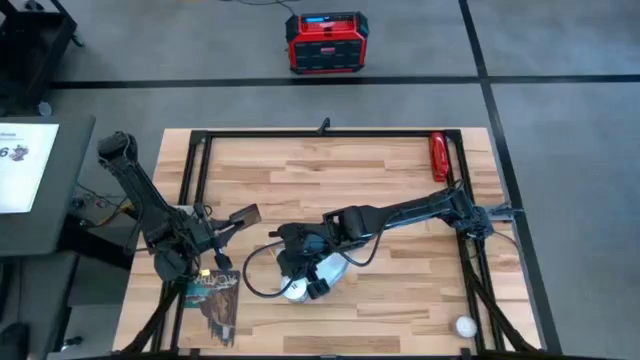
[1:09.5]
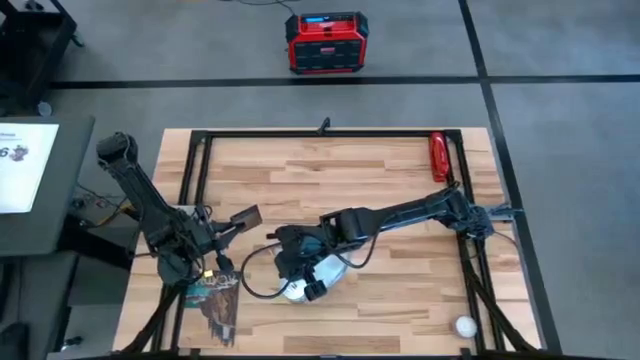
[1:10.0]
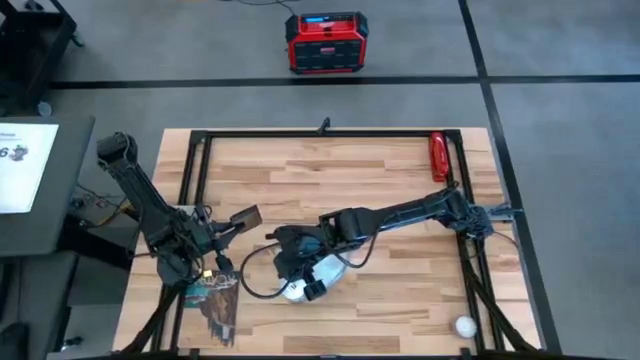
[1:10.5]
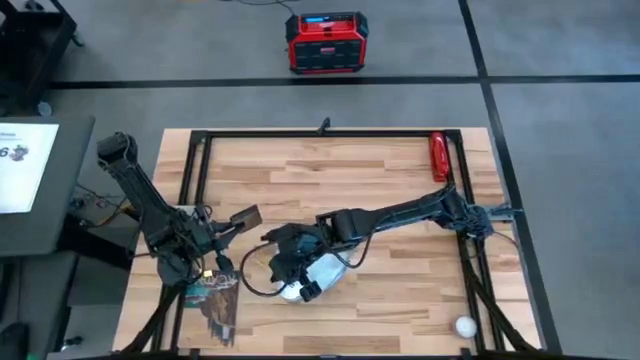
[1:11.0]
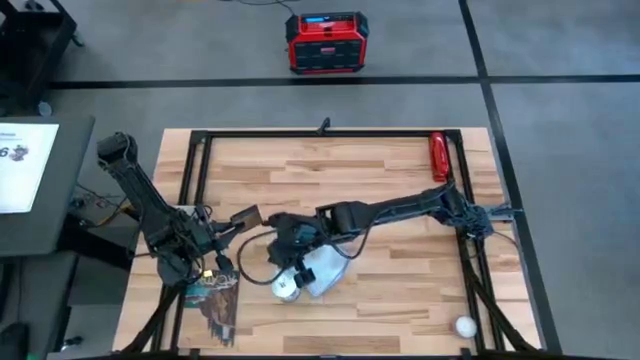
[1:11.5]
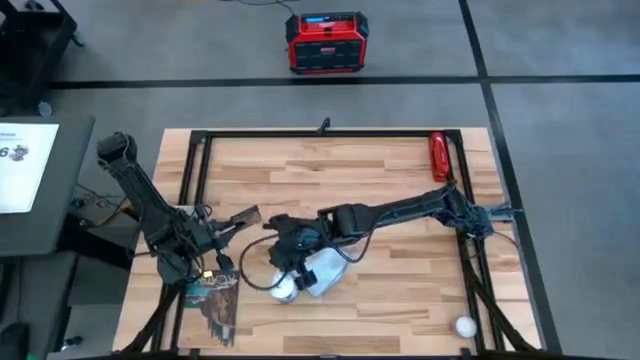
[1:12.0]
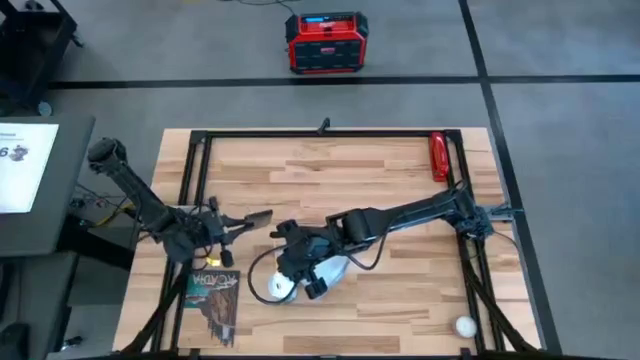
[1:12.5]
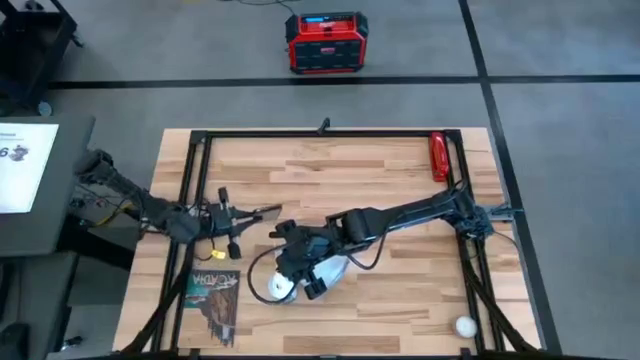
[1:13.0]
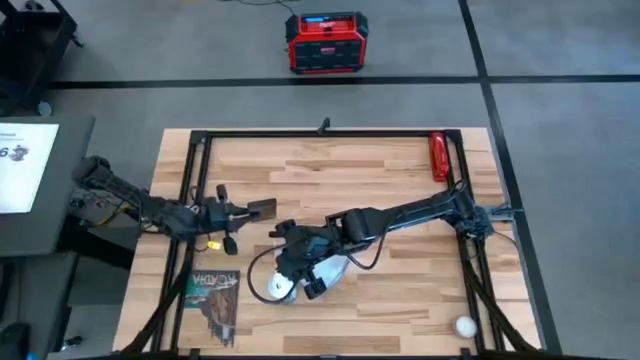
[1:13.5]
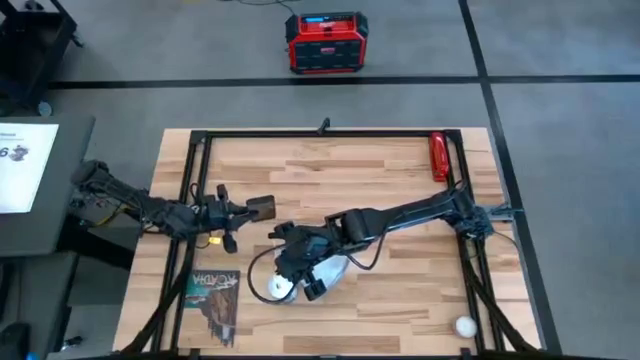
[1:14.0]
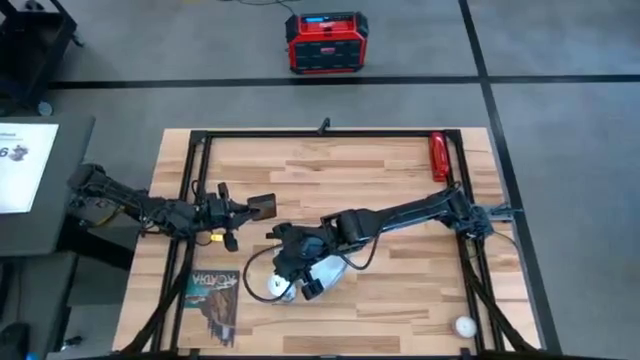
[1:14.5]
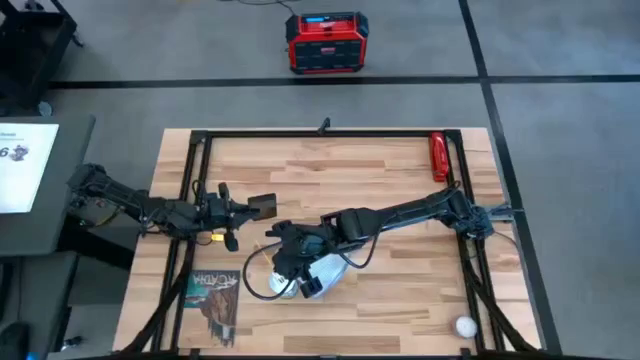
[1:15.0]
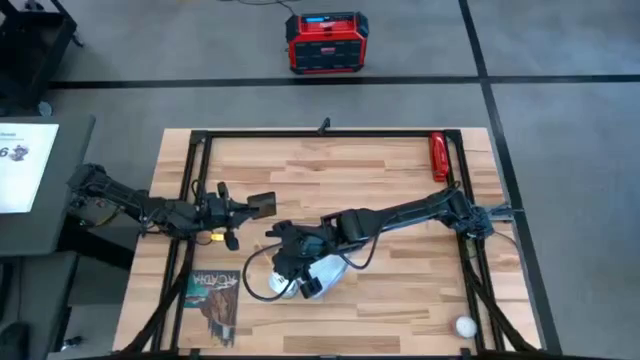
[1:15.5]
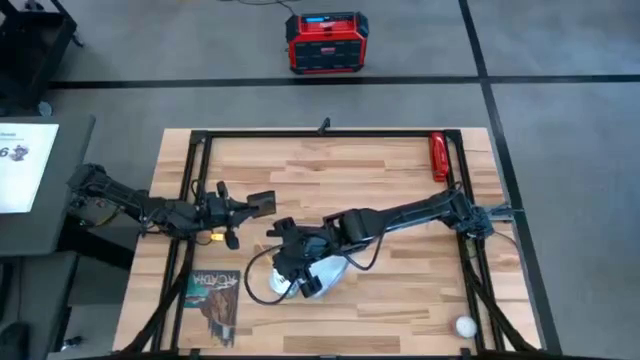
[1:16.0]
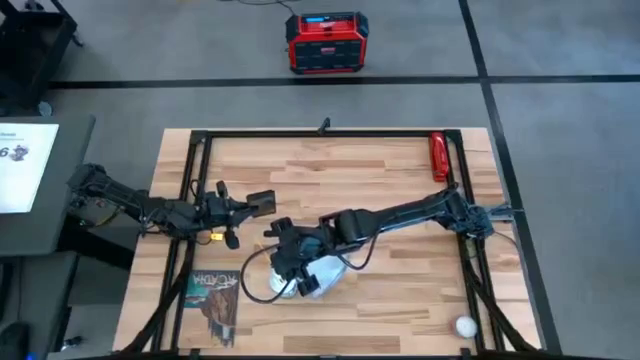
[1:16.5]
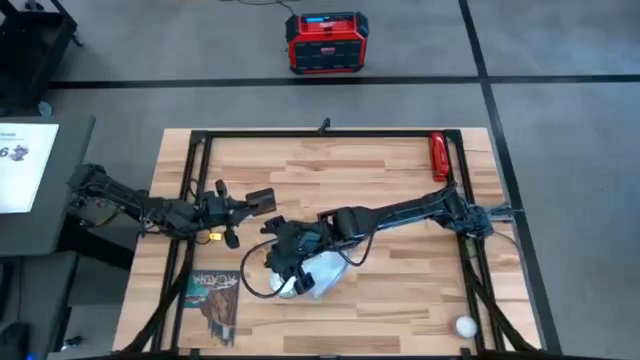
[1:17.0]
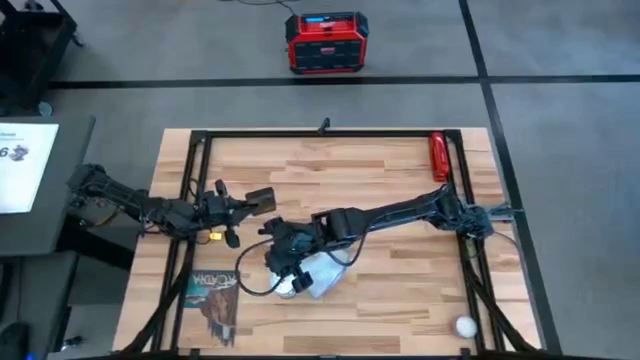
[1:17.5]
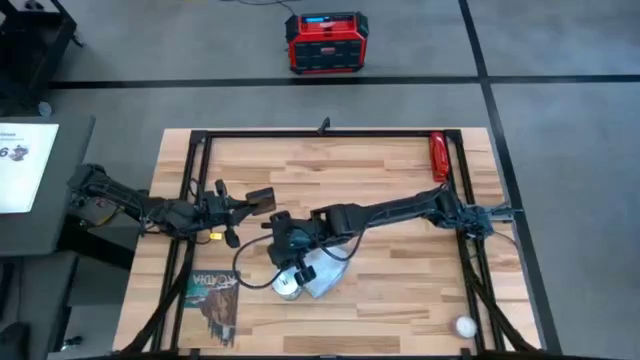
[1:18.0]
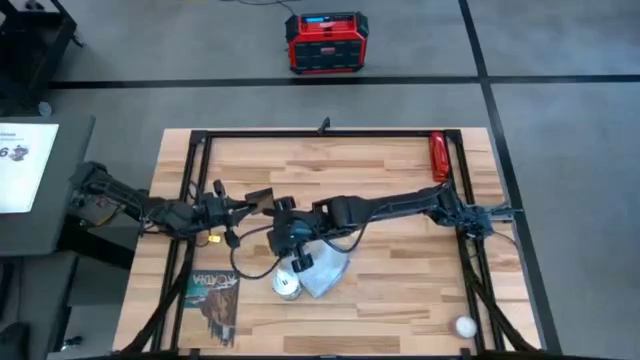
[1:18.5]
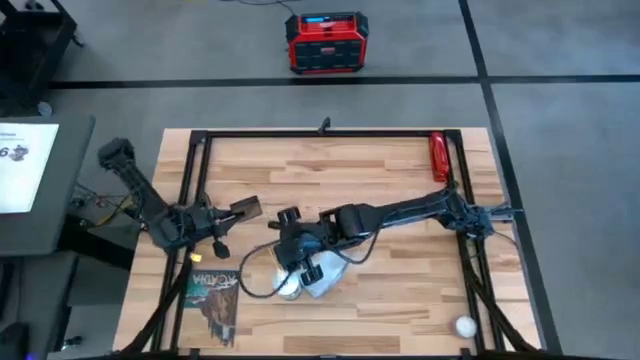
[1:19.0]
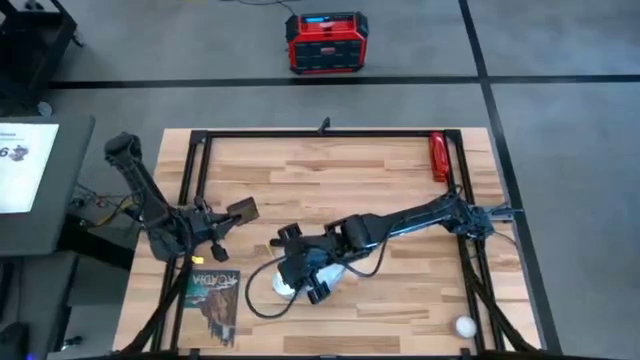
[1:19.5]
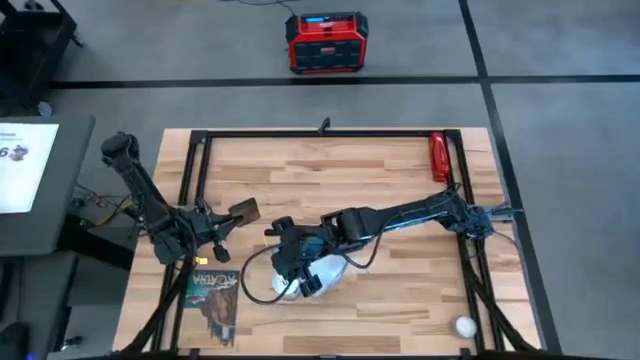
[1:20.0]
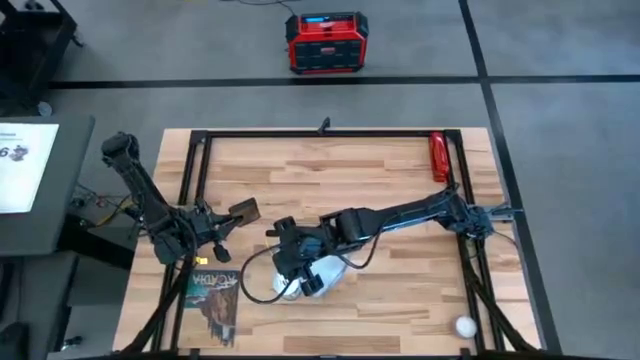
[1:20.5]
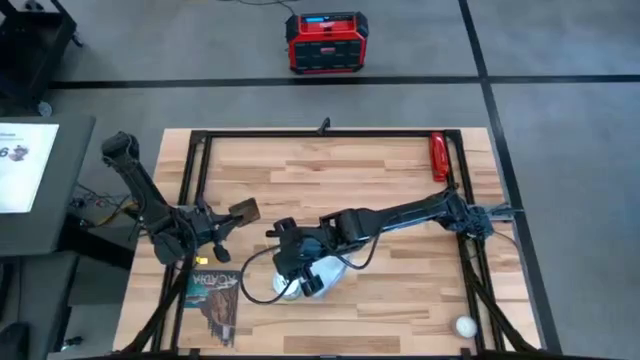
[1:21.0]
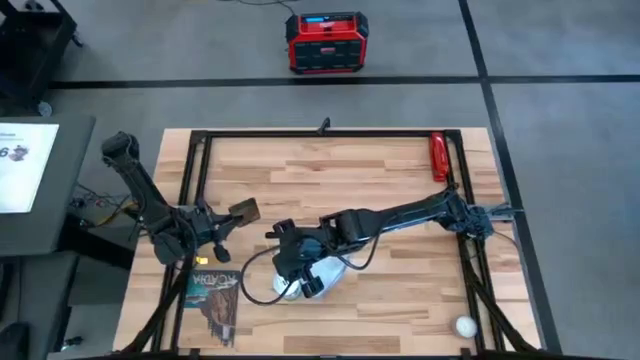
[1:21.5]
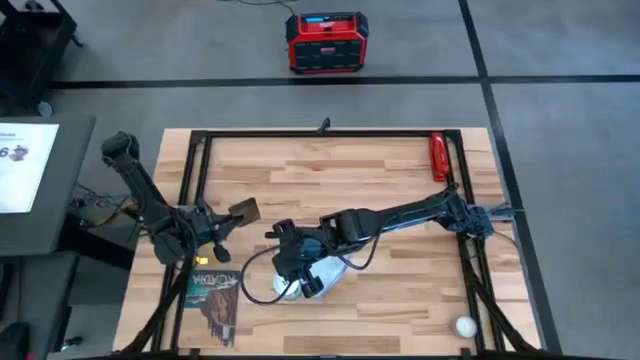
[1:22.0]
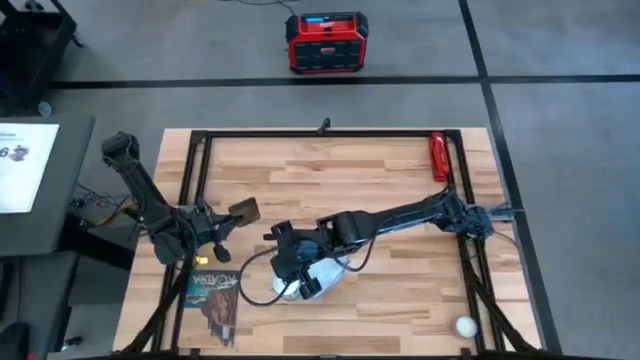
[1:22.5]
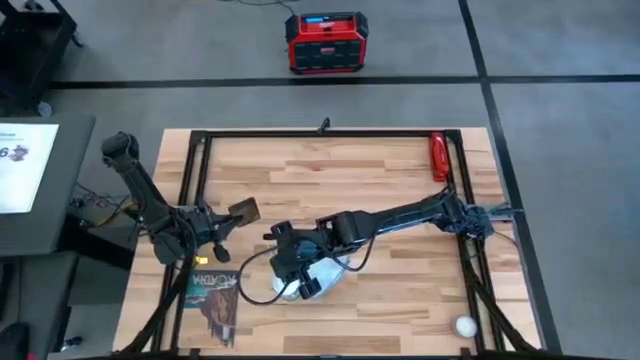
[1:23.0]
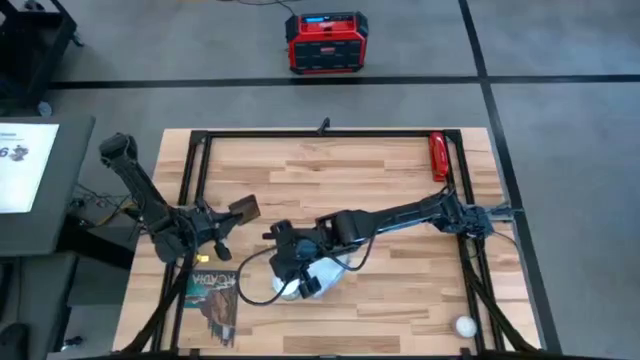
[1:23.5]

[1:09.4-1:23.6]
Task: Apply microfiber cloth
Spray the front of the cellphone using the spray bottle

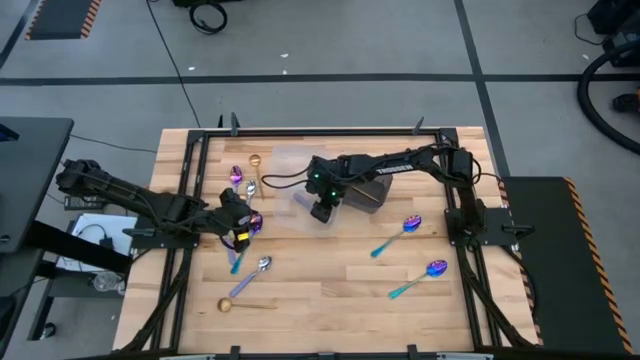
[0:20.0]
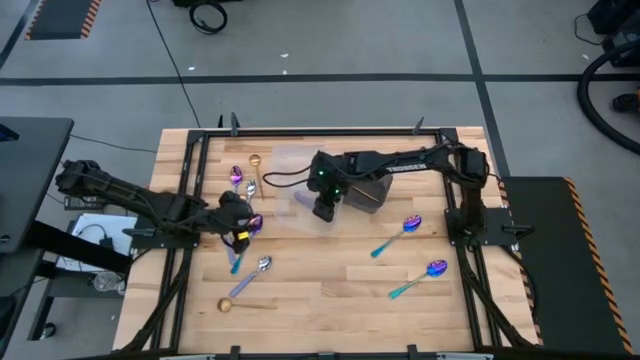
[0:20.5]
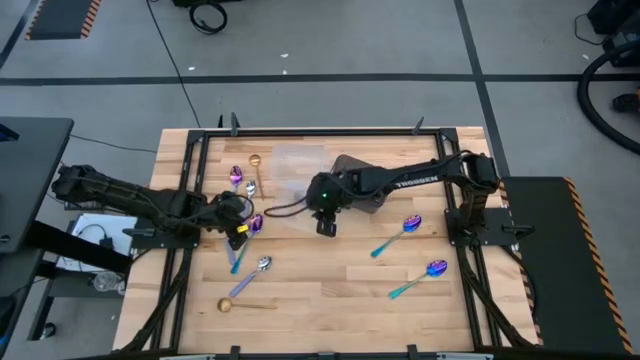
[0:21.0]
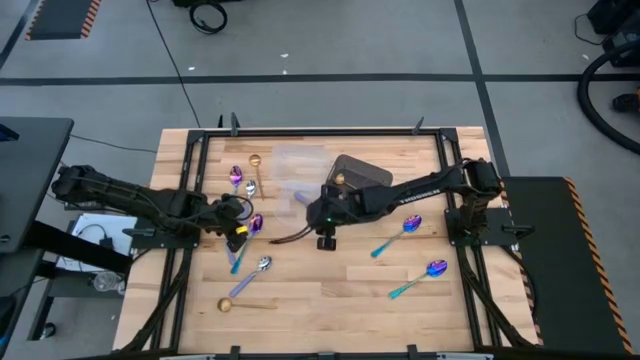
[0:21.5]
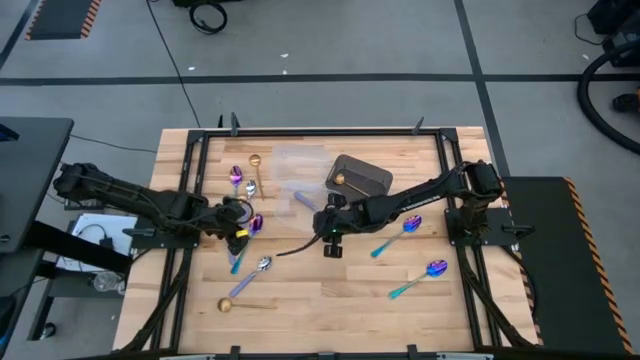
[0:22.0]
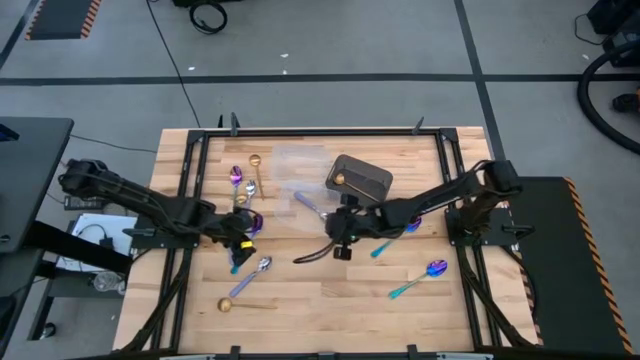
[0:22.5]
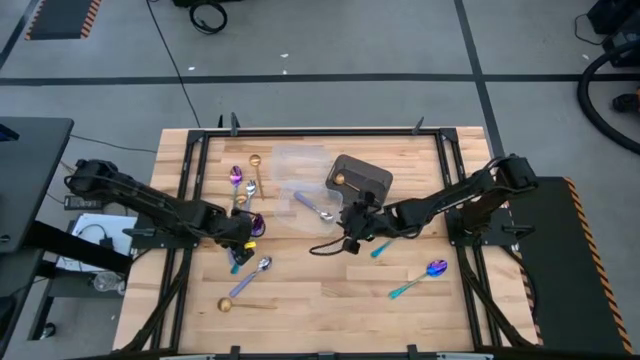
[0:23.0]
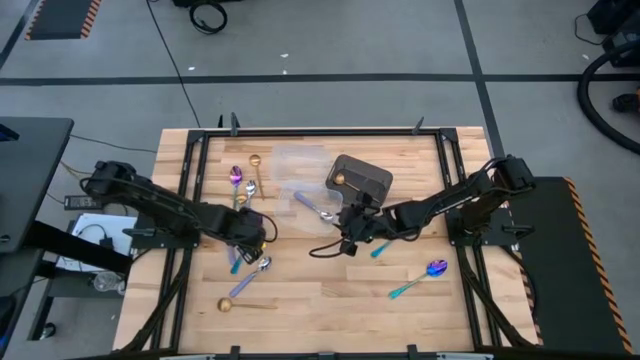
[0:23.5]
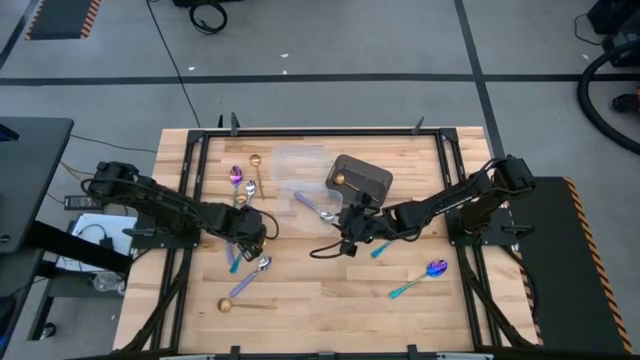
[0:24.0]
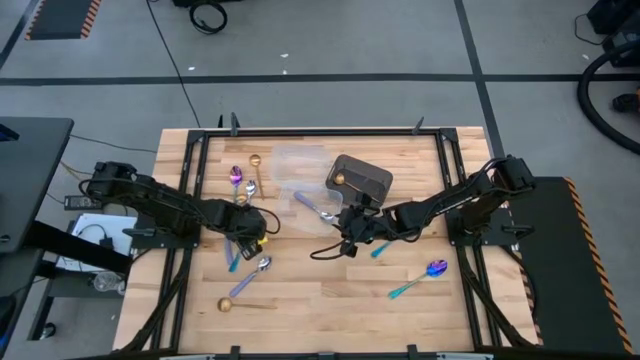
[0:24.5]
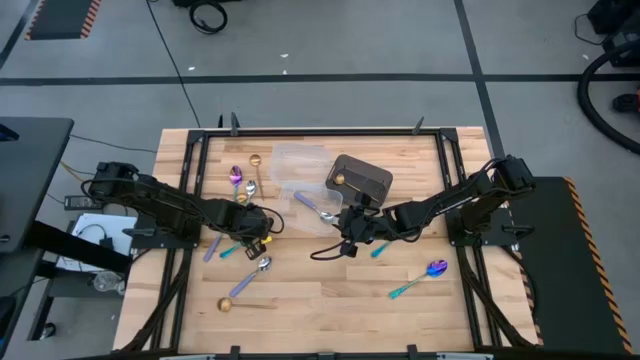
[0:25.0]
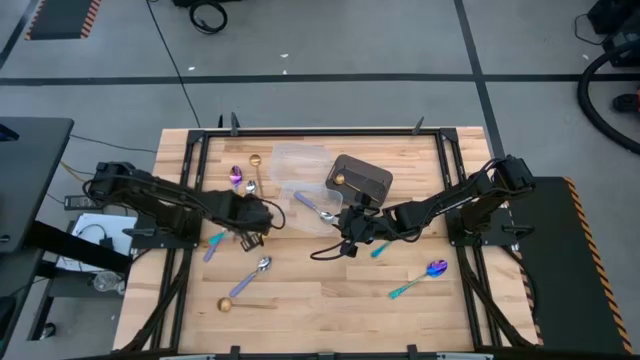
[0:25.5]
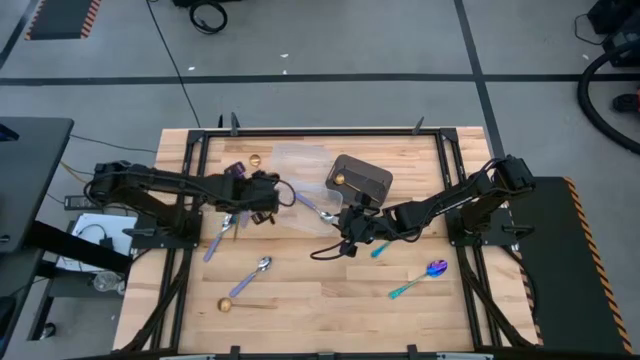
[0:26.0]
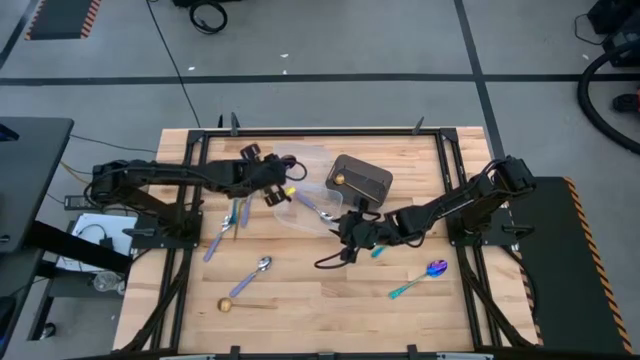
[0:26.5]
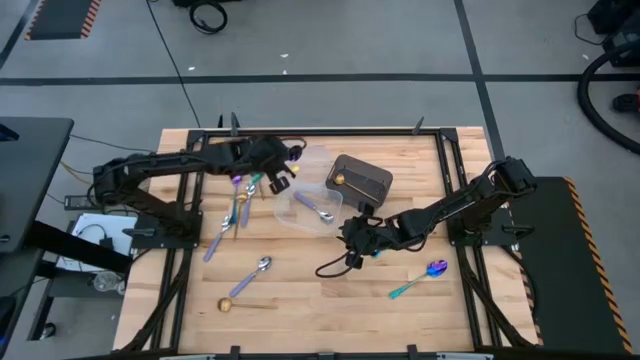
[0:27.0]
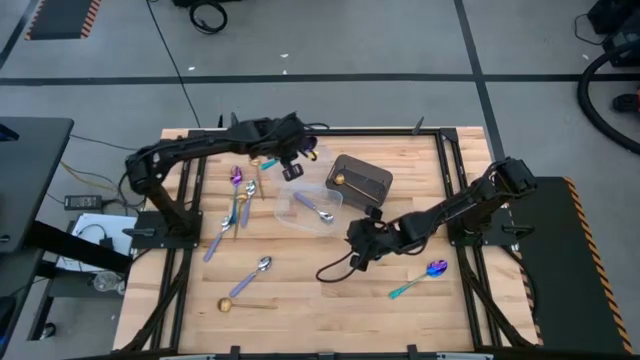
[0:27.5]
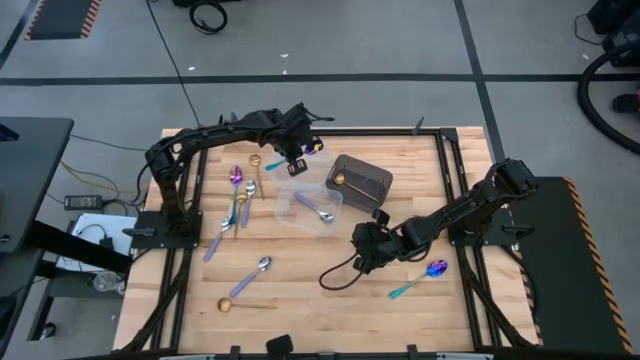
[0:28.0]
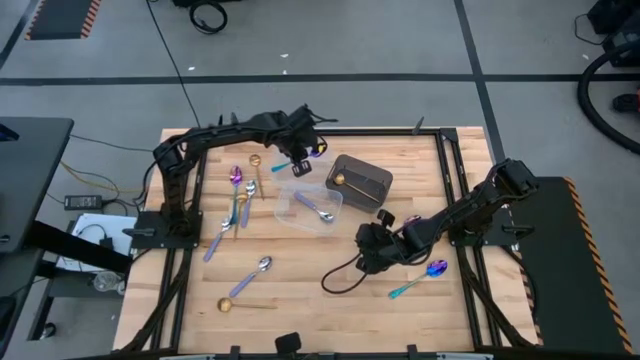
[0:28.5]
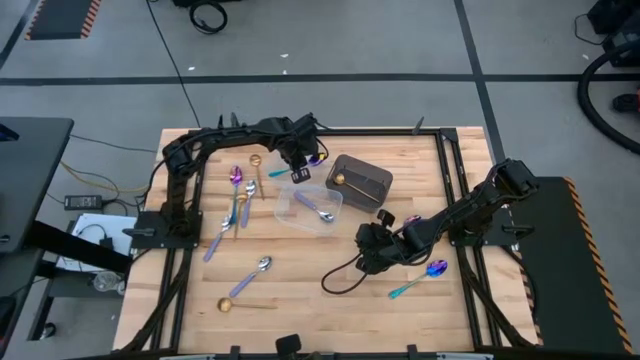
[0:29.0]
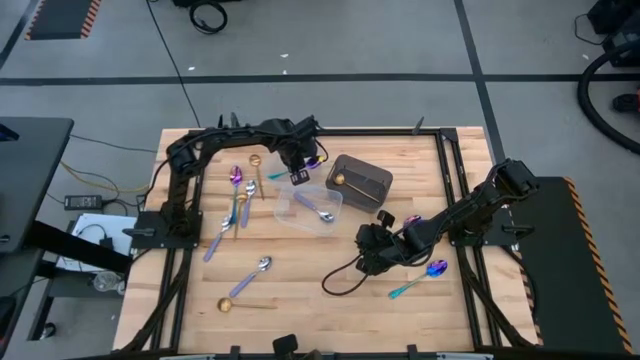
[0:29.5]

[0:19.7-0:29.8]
Task: Sort silverware by color (type)
Put the blue spoon into the top transparent bin
